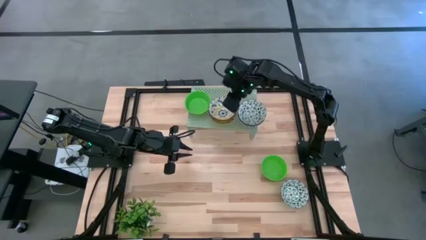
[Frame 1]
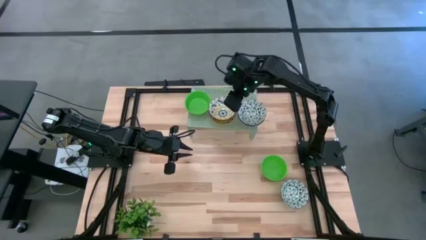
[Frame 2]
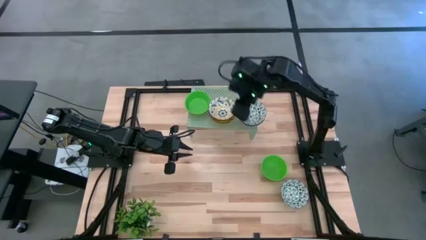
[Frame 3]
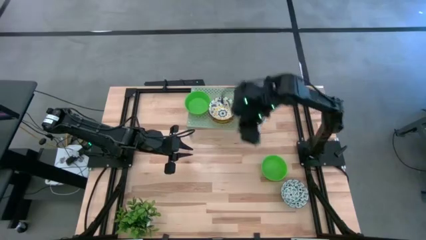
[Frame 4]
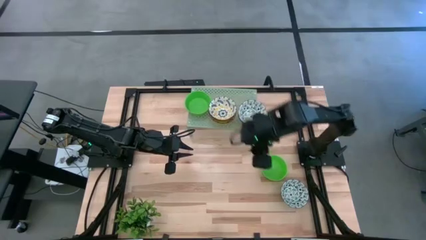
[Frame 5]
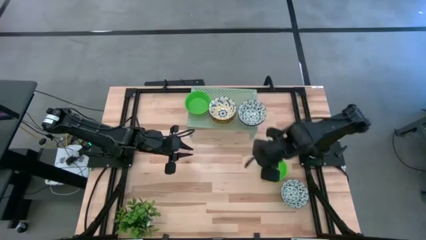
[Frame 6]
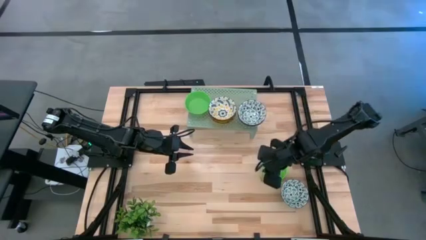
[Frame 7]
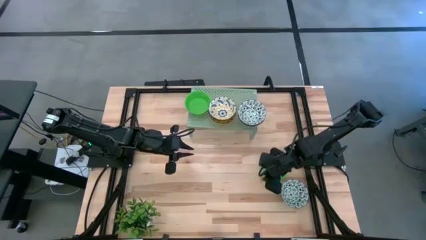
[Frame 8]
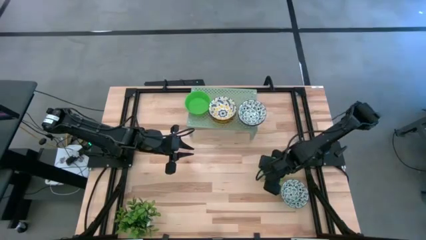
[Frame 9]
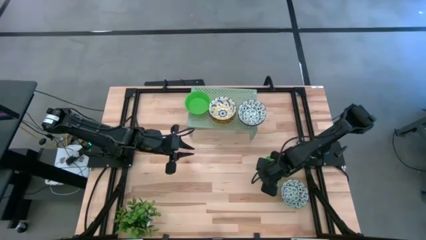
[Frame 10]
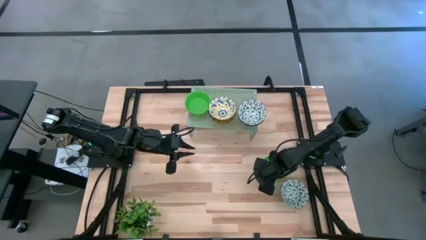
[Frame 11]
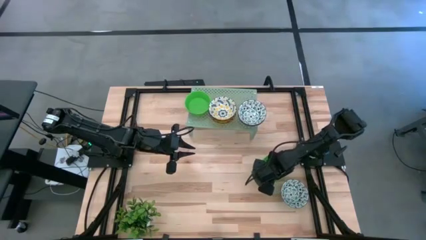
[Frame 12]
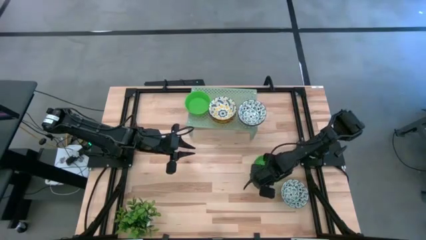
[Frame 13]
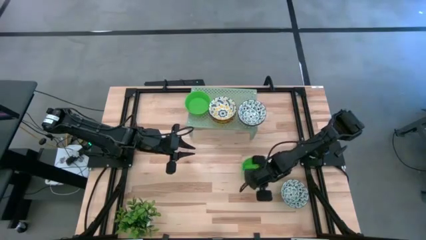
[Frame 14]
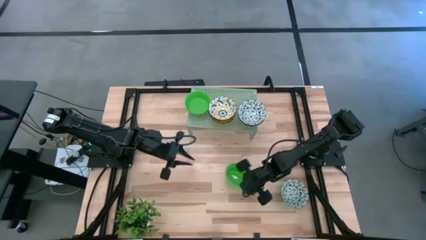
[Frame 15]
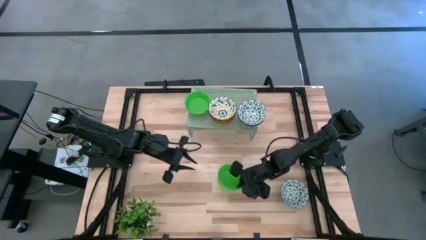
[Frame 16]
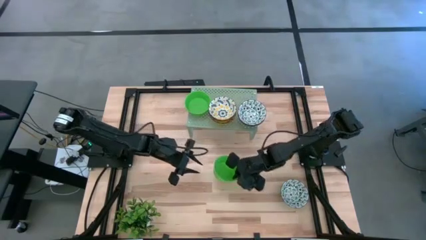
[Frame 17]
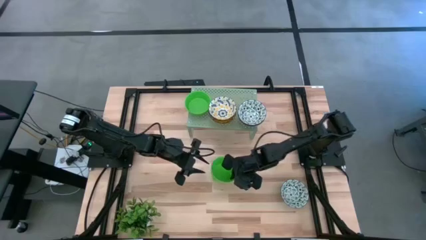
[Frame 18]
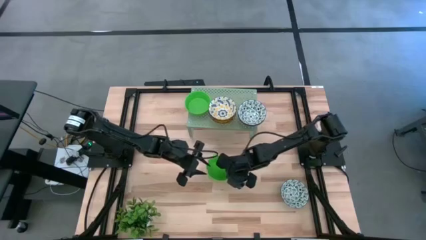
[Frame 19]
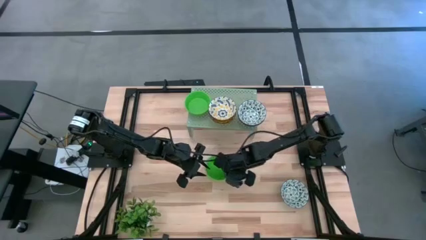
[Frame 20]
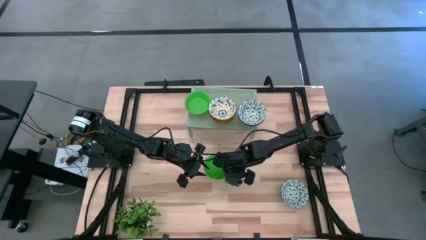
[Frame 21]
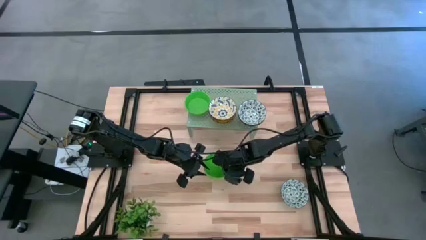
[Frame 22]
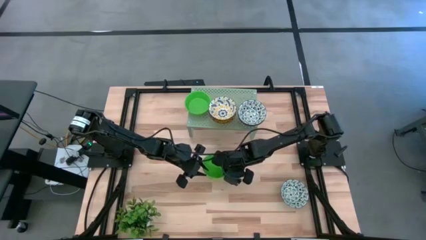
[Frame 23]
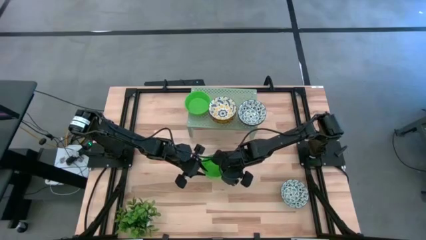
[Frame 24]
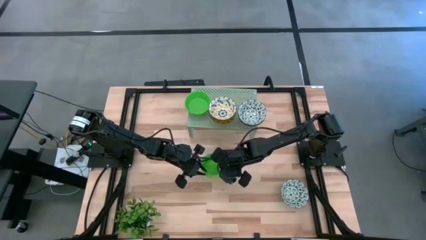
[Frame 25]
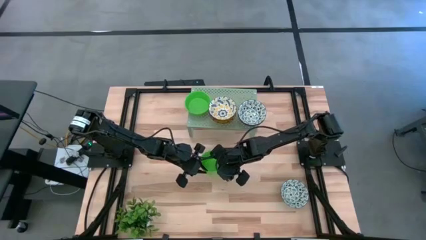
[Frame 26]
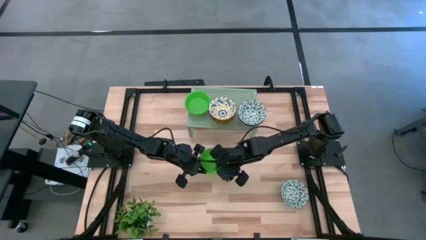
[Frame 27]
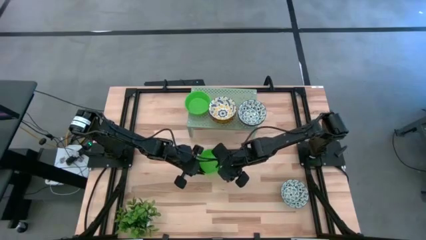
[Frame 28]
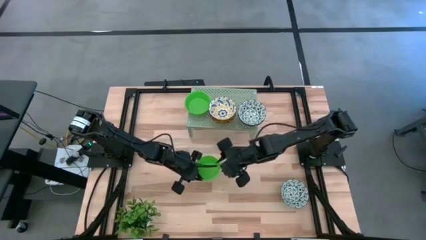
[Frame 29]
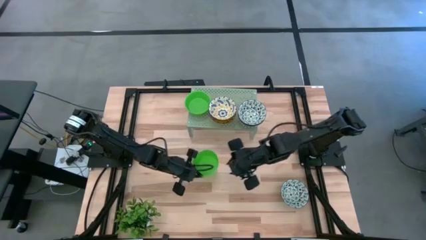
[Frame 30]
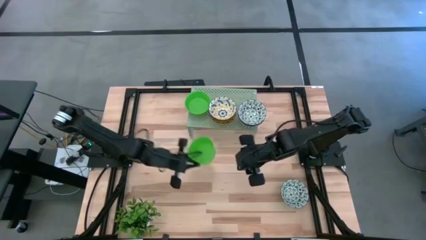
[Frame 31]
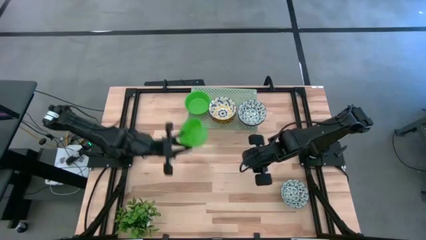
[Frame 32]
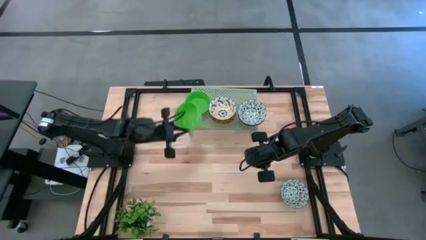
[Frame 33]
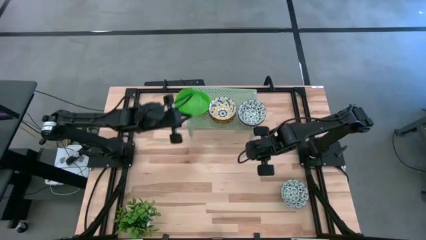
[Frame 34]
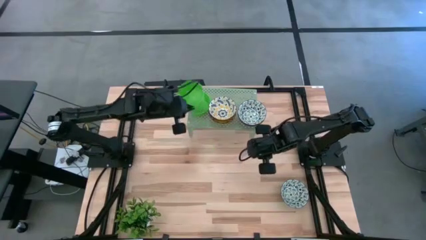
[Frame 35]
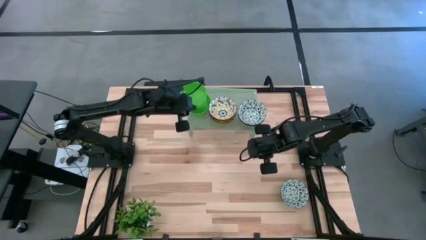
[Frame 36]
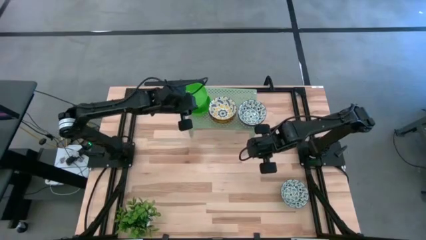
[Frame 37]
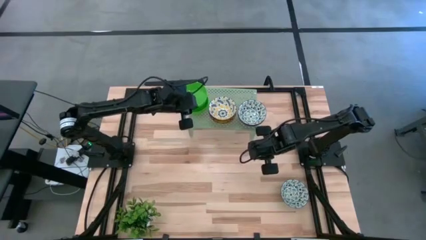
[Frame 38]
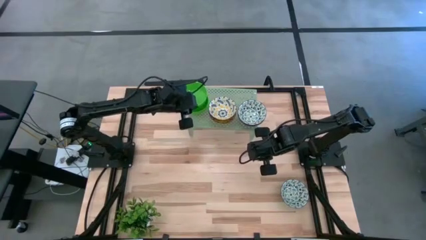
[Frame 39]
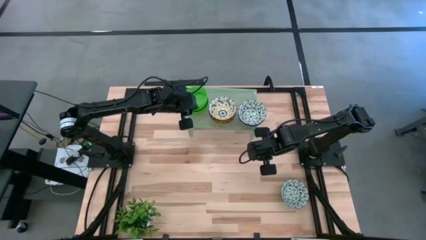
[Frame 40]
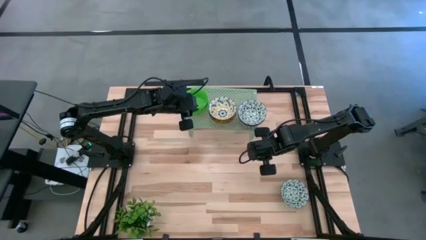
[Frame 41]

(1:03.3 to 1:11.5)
Task: Pick & Place Mini bowls
Stack the green bowl on the green bowl on the shelf

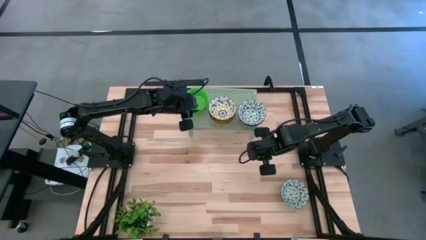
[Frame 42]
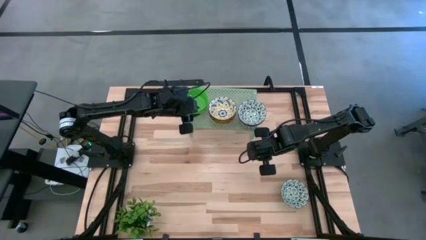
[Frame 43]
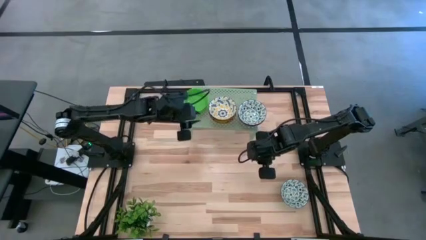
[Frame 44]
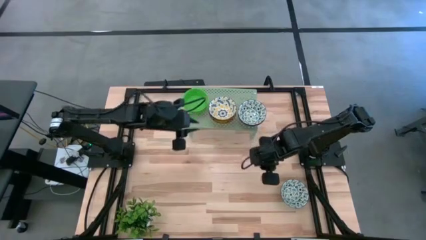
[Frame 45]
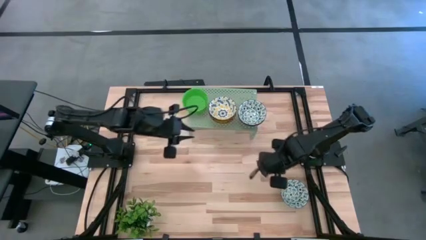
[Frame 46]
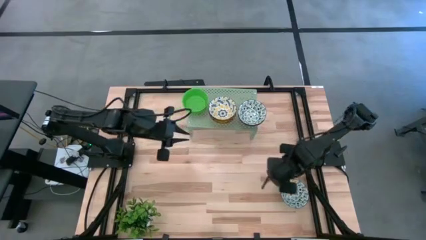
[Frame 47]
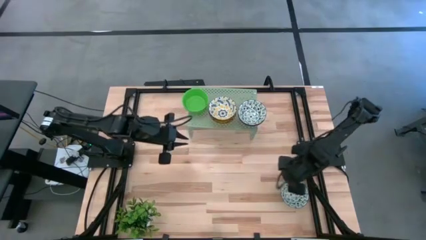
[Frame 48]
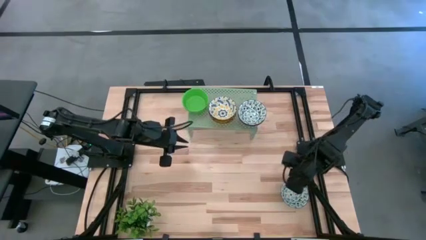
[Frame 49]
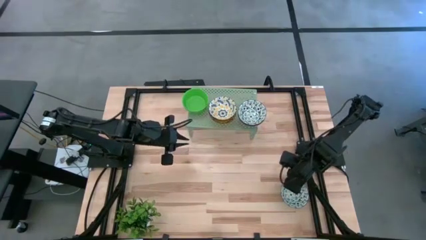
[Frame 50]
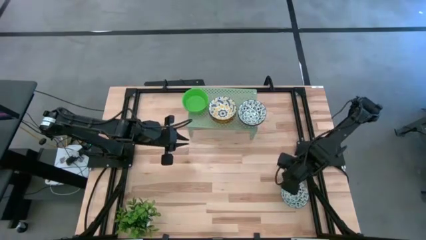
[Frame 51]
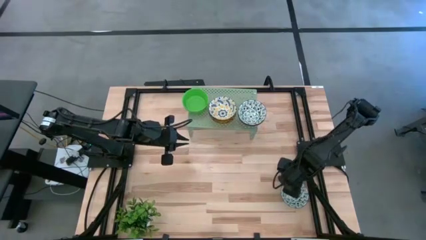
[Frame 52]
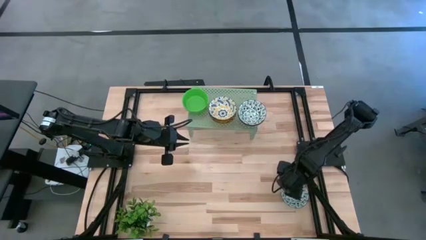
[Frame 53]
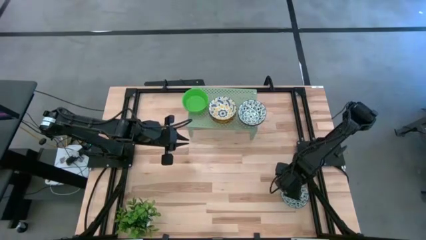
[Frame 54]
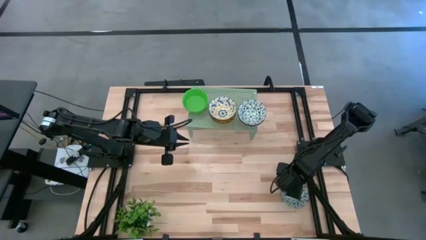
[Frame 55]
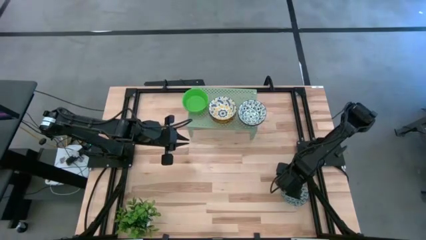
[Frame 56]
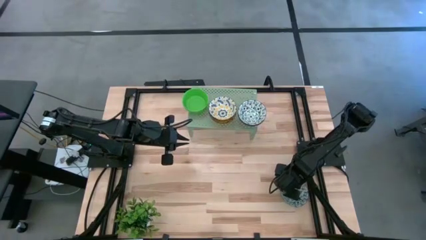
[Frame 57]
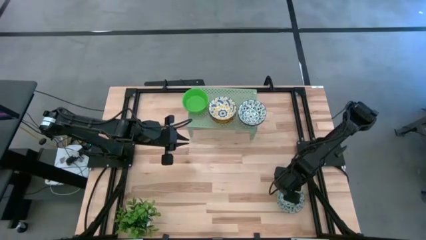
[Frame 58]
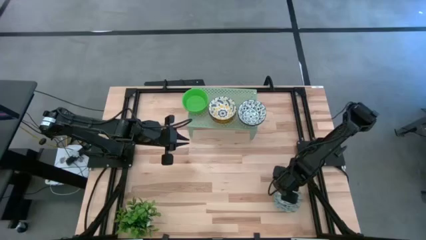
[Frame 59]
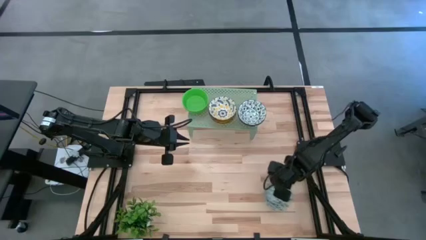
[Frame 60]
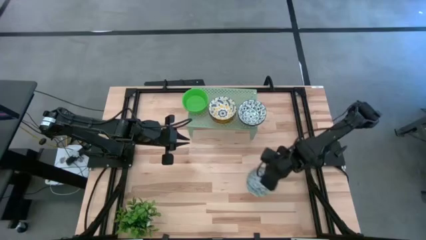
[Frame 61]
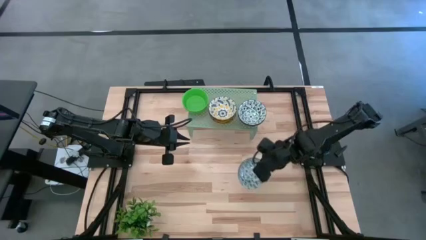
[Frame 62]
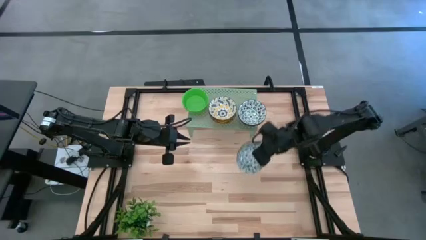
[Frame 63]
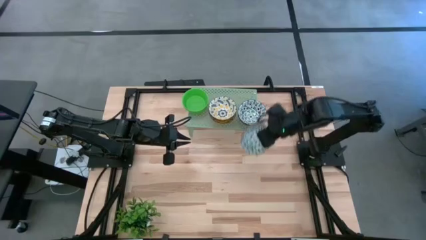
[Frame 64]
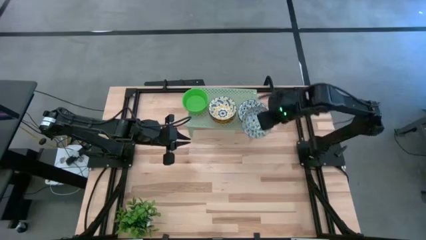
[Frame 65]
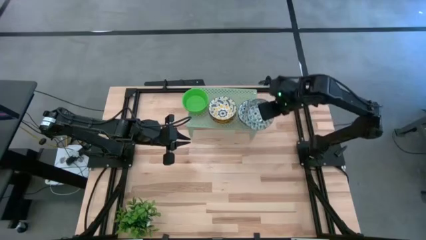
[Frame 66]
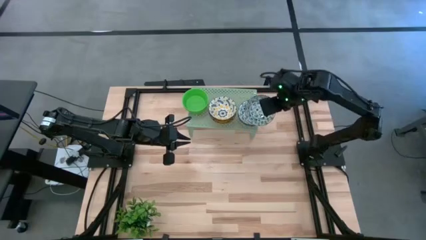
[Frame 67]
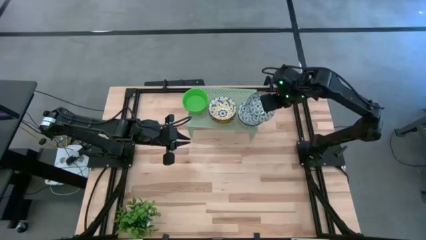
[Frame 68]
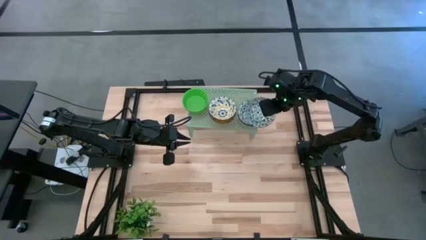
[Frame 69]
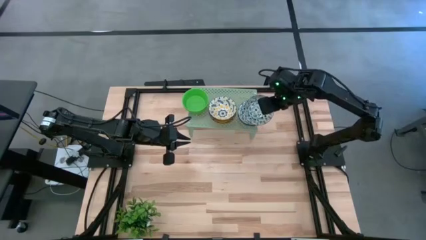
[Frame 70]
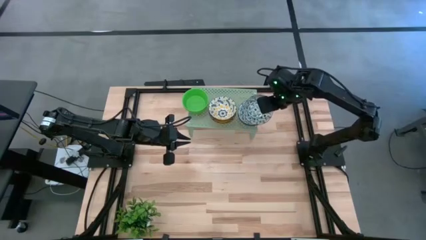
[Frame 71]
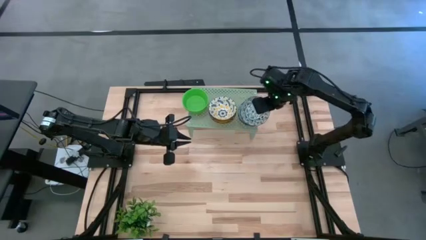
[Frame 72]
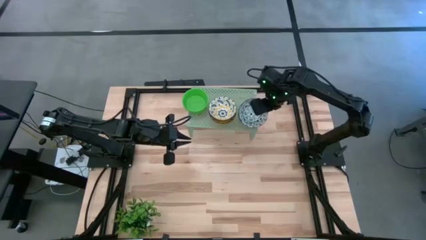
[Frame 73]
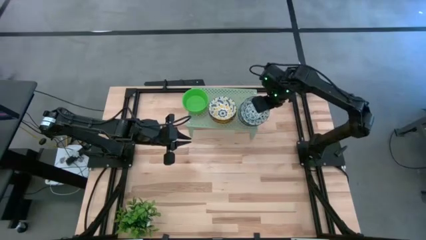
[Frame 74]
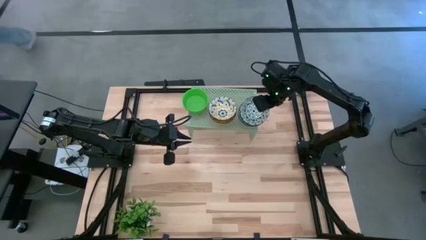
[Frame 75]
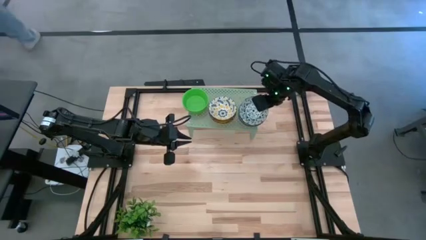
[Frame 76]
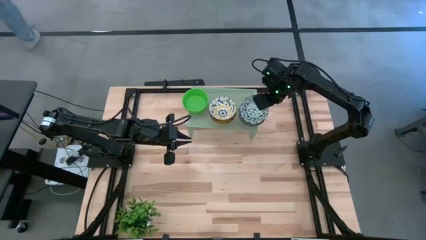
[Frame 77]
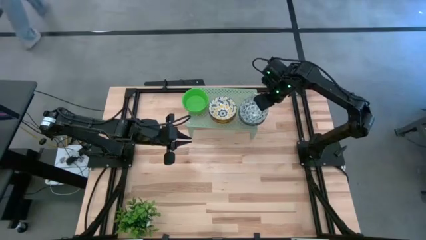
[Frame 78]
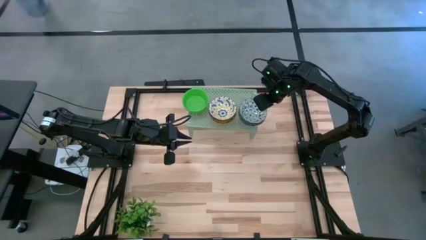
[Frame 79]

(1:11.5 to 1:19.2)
Stack the blue bowl on the blue bowl on the shelf

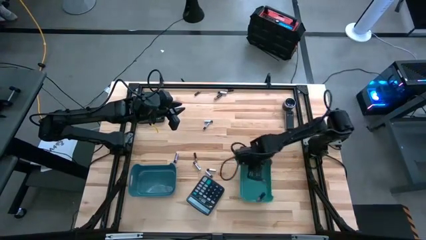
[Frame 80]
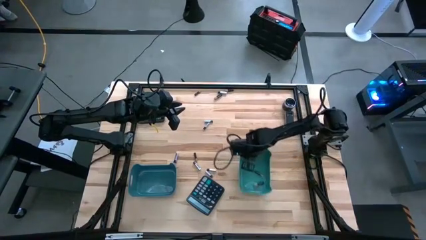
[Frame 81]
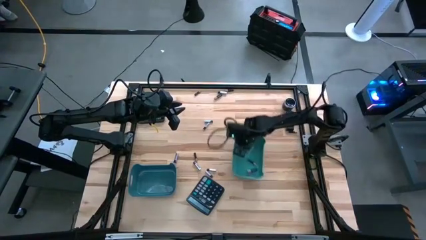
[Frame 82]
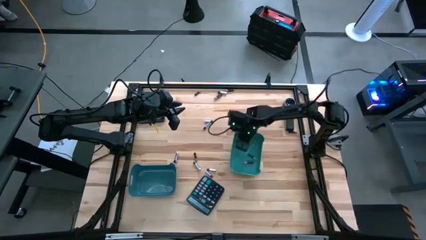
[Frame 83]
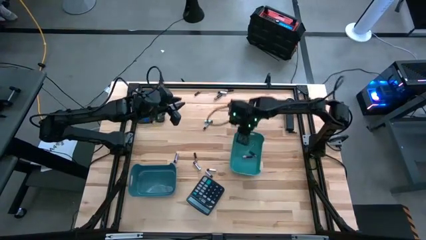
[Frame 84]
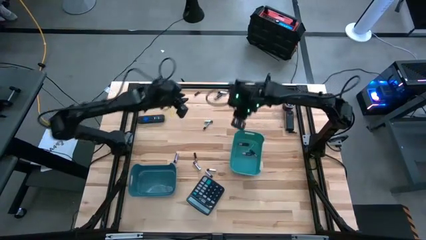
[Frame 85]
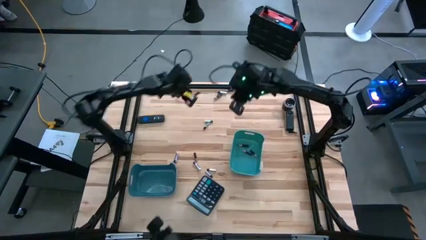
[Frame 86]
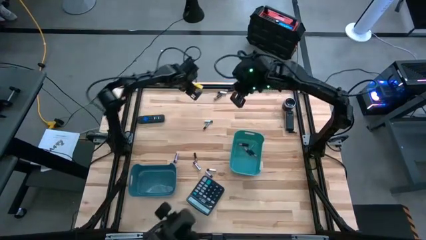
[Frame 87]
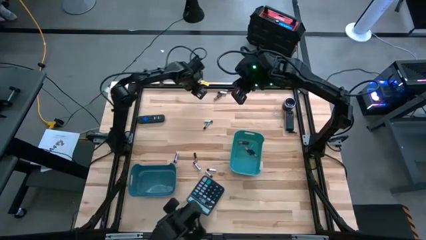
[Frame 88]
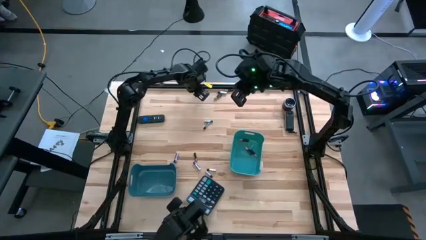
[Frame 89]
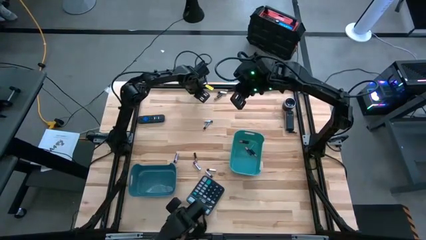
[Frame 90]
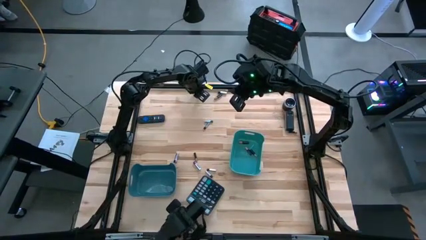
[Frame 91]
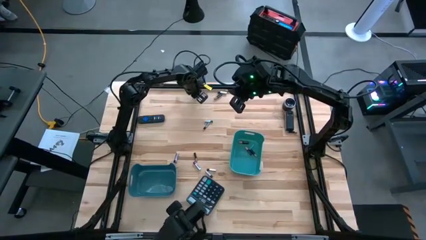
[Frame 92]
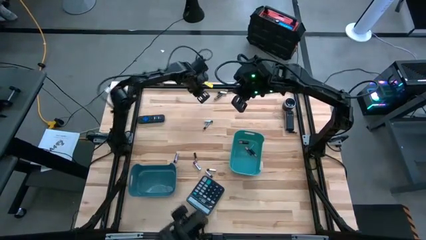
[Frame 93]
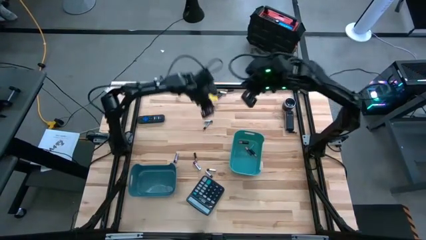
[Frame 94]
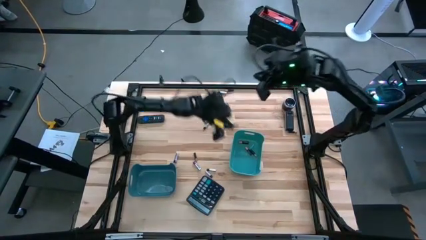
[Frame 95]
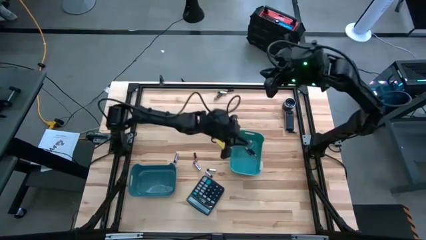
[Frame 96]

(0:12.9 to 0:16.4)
Task: Sort batteries
Put the black battery into the dark green bin
